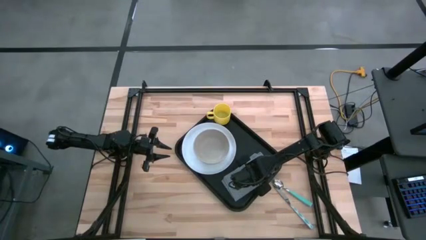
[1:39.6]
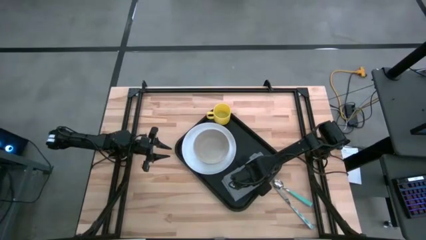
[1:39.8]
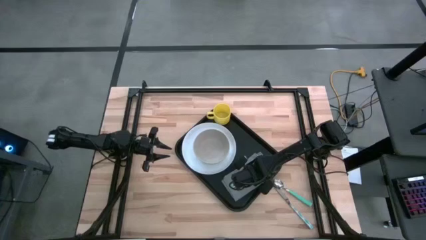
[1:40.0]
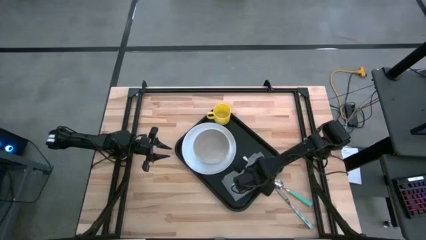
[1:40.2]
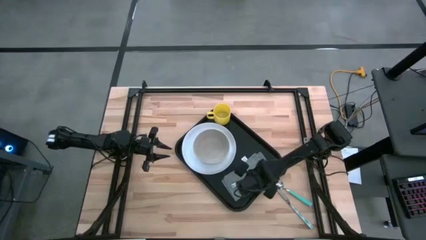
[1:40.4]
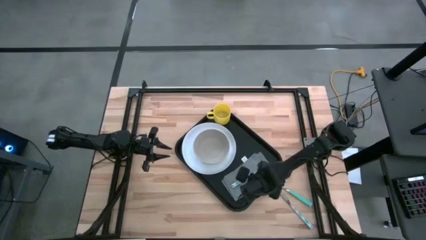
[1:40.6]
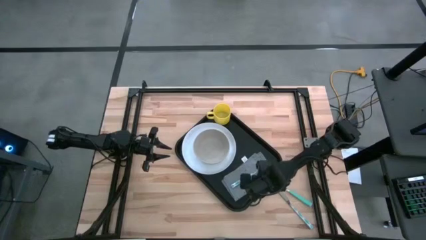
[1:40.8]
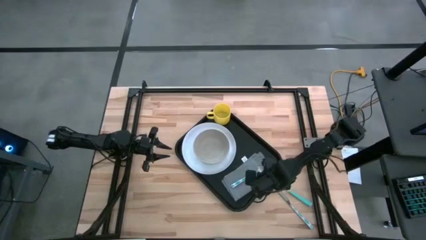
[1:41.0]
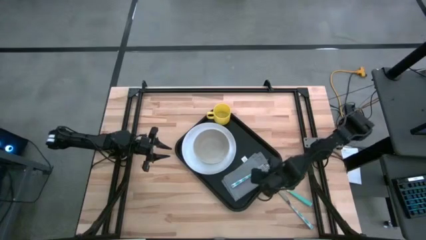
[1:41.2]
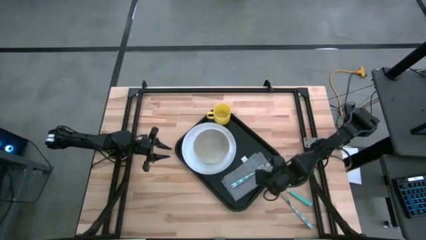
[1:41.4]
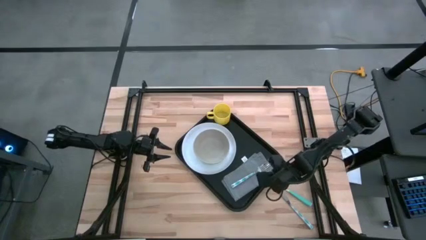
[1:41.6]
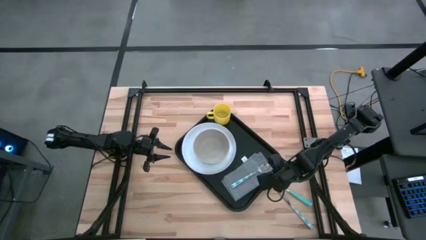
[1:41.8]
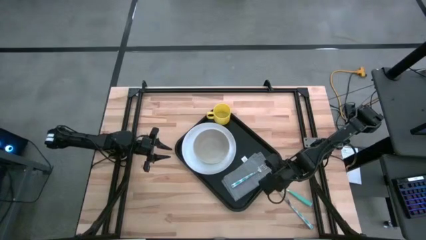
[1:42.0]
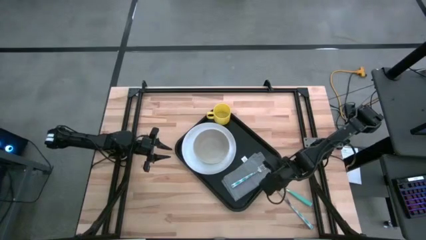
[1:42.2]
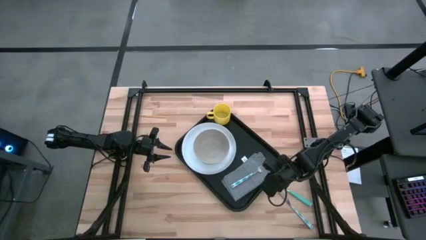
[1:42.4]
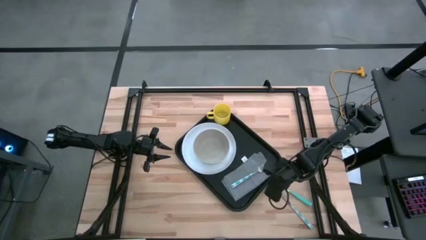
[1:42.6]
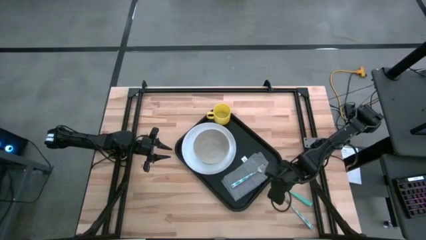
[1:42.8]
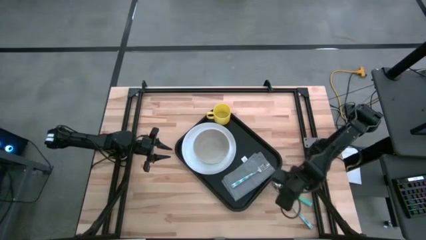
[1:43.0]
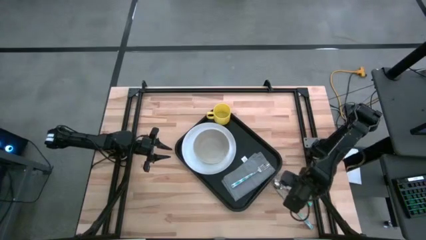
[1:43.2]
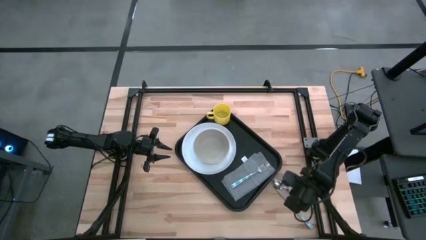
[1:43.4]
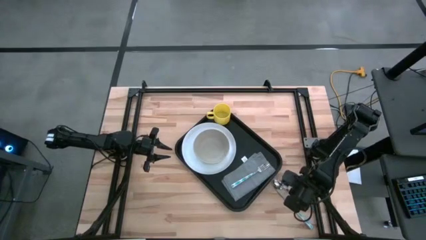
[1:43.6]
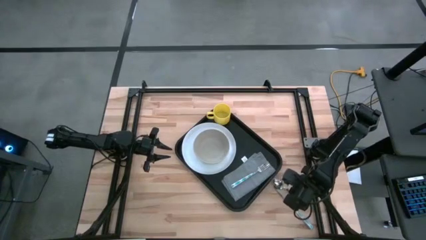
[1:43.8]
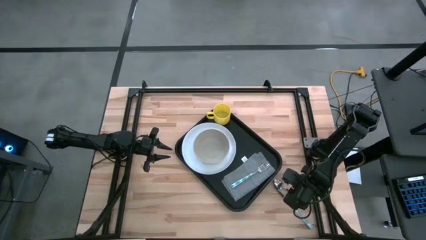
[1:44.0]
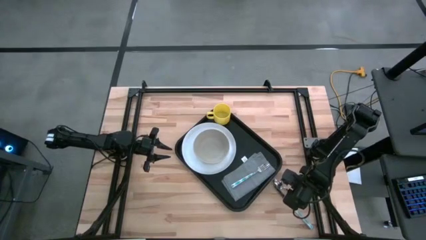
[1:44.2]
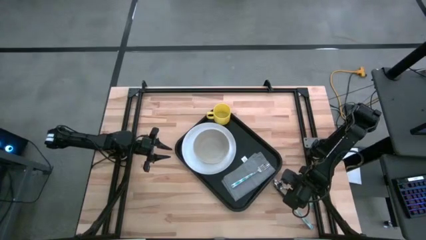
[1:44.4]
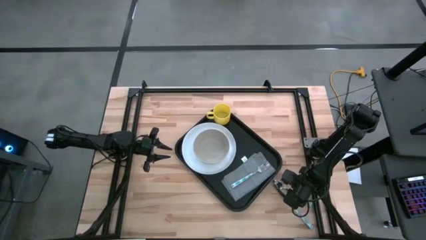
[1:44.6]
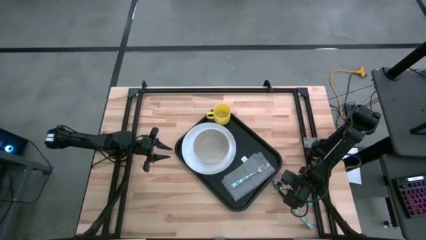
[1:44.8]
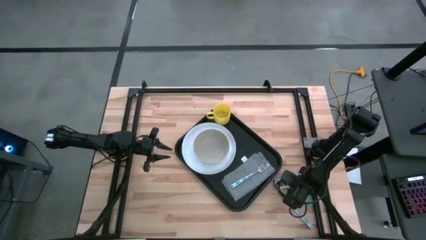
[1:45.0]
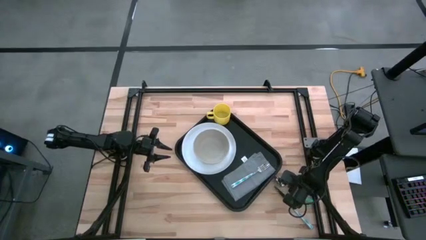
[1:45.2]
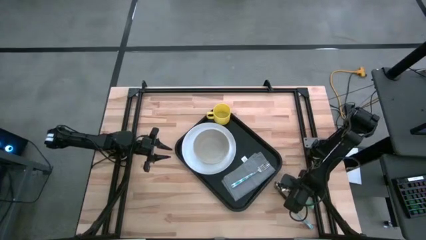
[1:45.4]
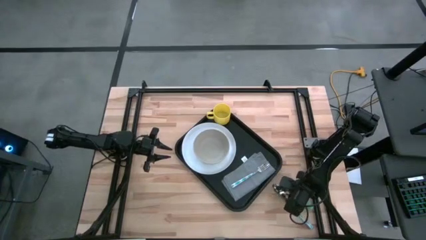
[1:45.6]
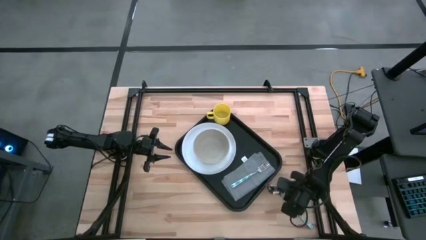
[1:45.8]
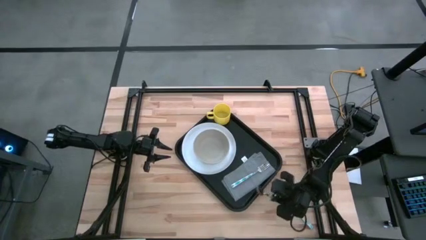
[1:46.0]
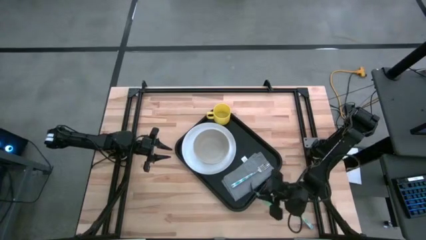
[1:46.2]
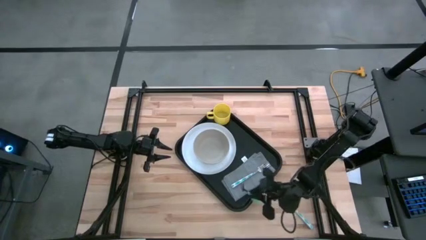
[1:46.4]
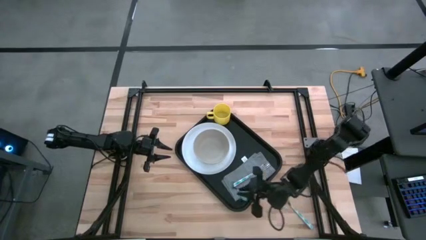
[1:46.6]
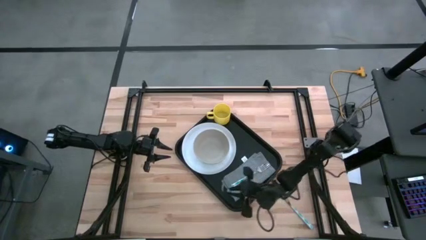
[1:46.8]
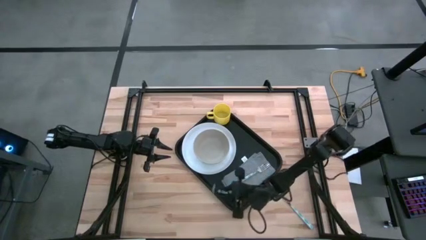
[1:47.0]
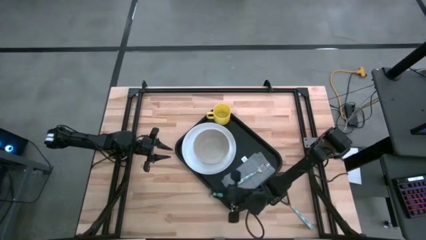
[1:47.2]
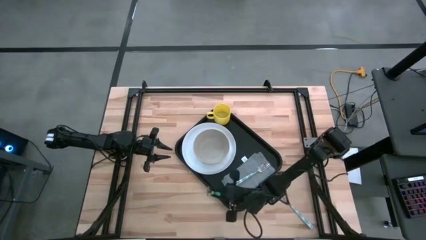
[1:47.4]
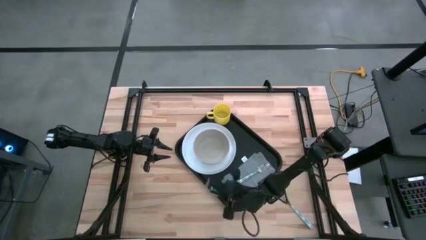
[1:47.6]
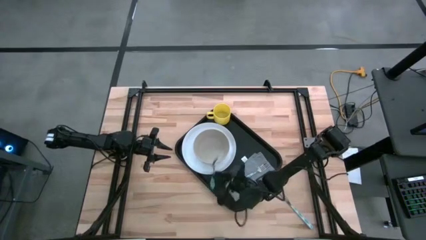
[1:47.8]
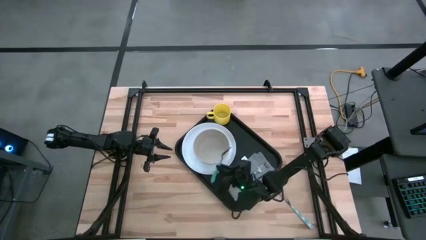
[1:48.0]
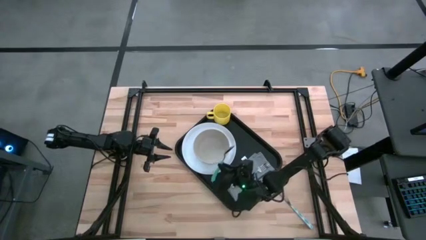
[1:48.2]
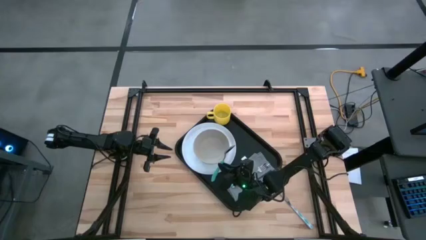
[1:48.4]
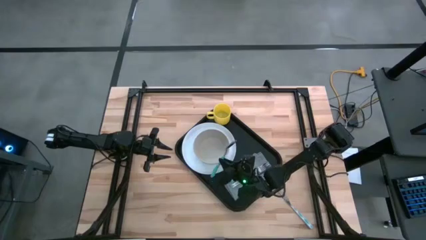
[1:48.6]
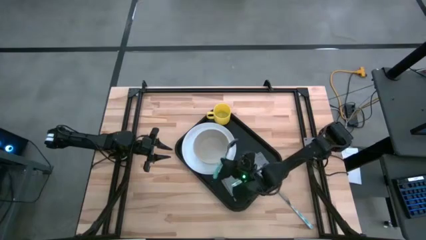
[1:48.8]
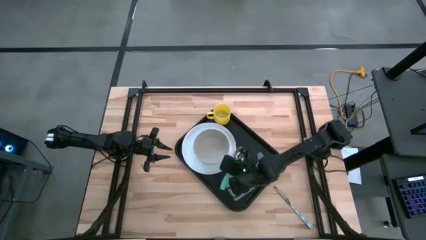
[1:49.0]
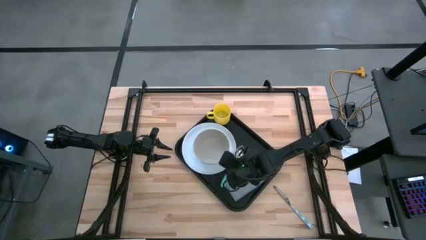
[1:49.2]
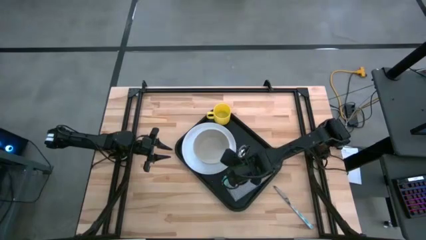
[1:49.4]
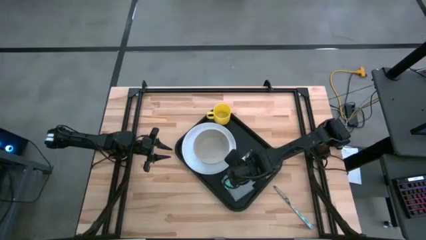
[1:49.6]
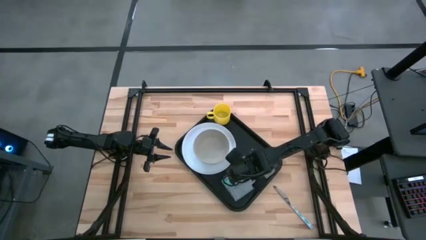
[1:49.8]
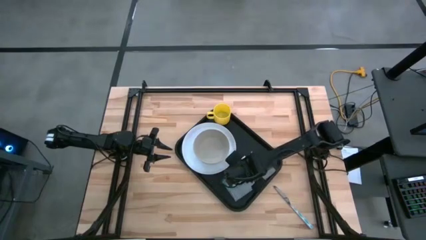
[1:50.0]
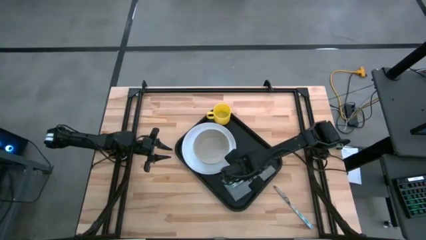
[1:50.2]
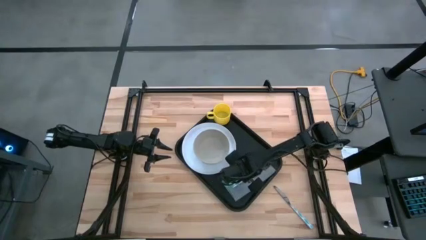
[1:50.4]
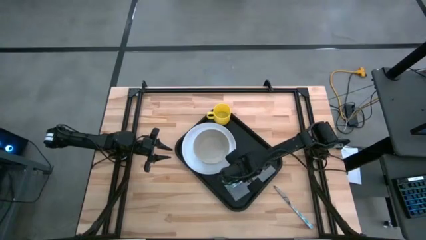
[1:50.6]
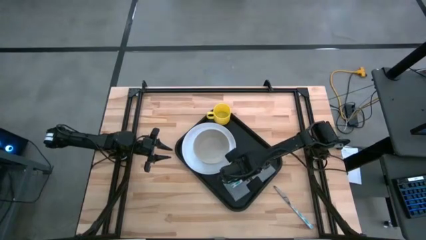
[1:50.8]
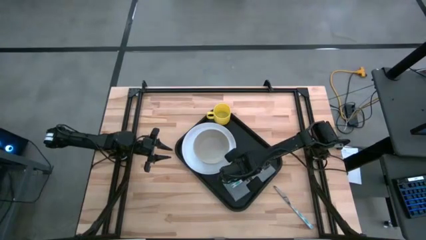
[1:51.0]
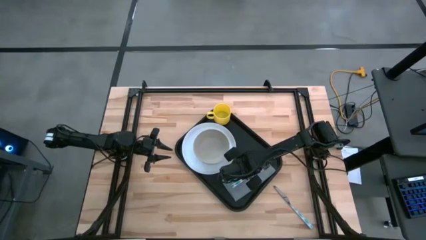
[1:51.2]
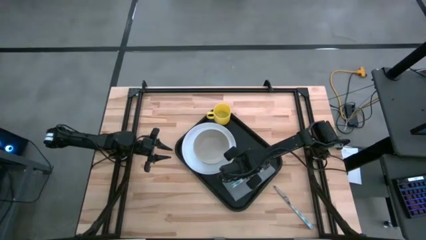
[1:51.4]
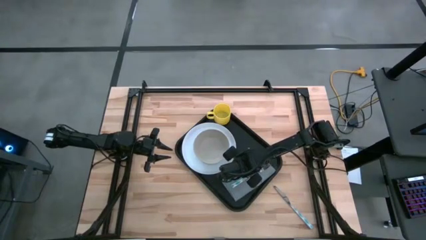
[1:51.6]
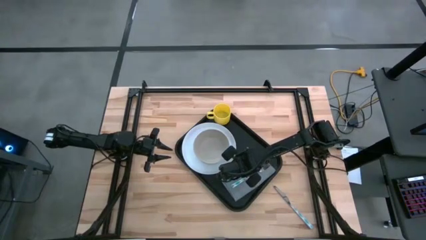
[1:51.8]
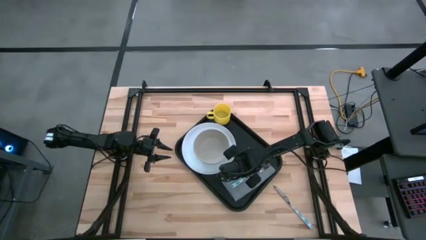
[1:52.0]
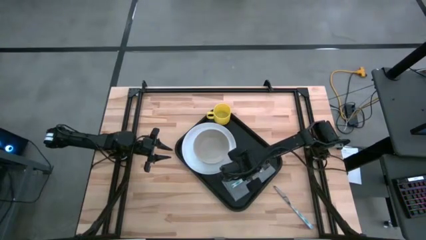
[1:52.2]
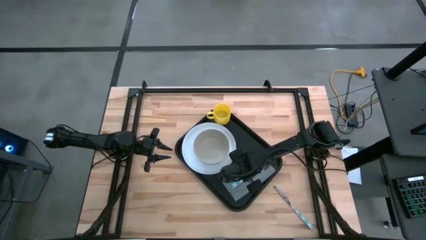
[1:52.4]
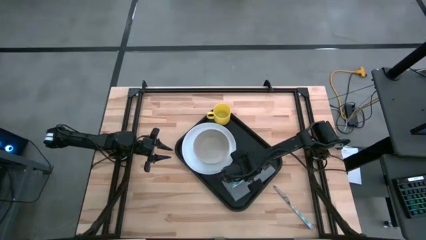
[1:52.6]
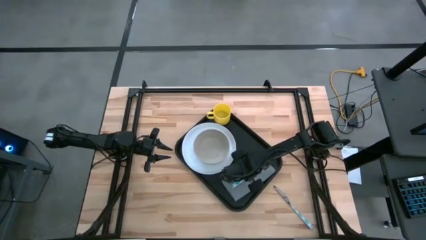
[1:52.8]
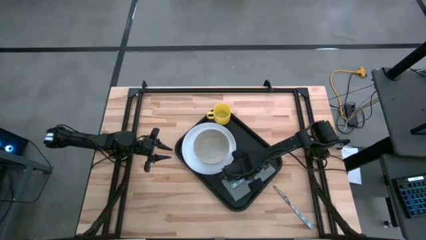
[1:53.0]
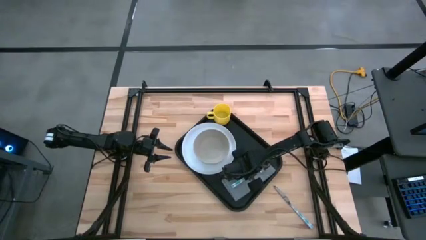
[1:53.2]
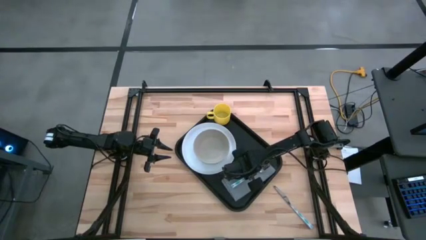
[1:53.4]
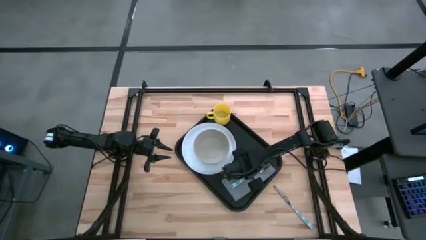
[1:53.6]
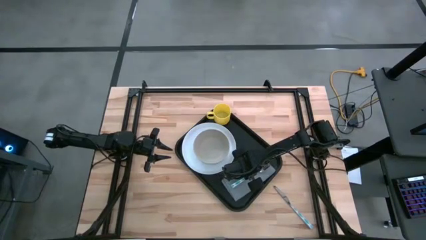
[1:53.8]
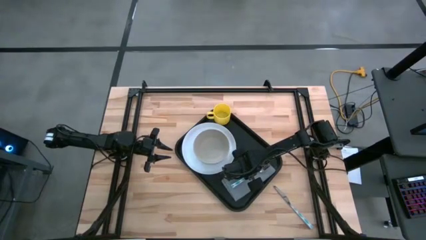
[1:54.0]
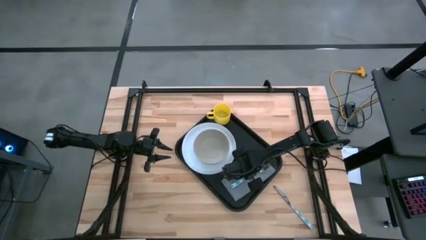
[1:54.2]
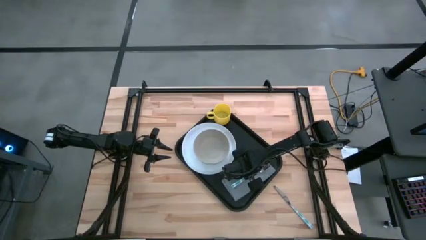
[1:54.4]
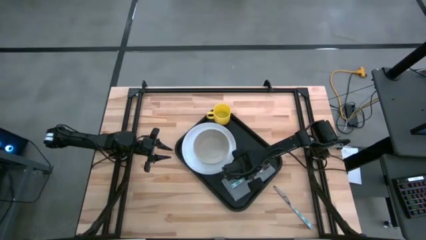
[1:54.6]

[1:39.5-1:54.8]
Task: Set up tray
Put the blue spoon to the left of the white and blue fork on the gray napkin on the black tray

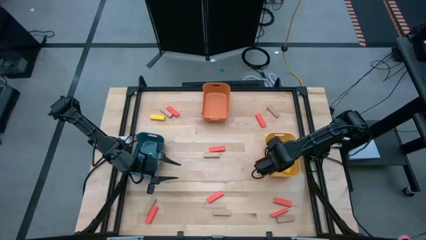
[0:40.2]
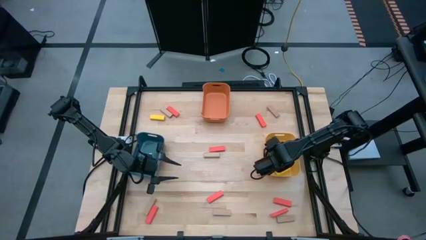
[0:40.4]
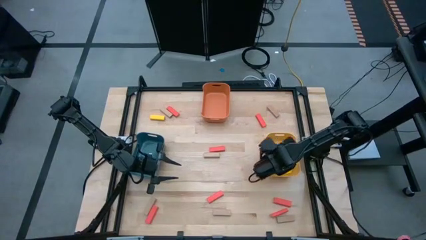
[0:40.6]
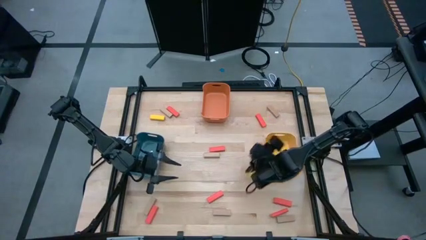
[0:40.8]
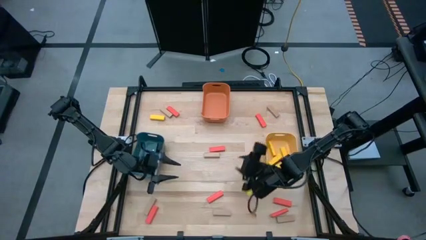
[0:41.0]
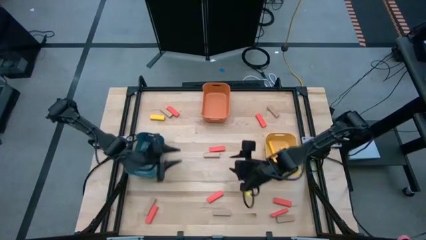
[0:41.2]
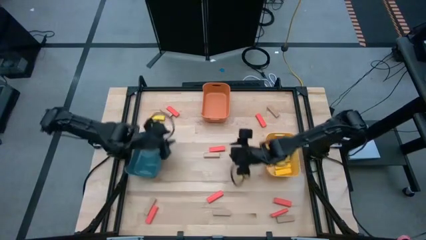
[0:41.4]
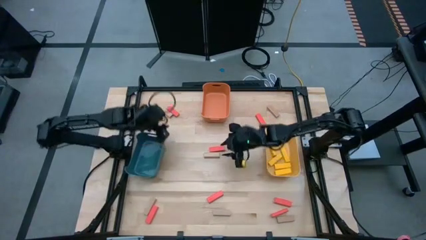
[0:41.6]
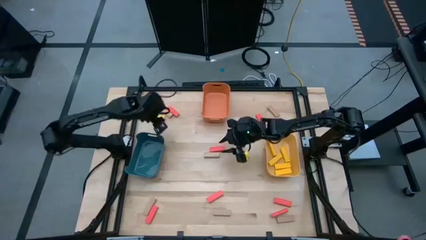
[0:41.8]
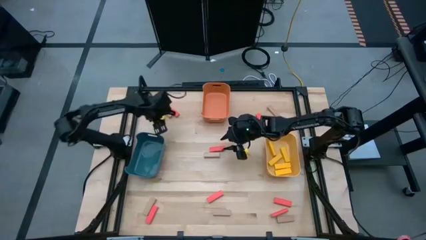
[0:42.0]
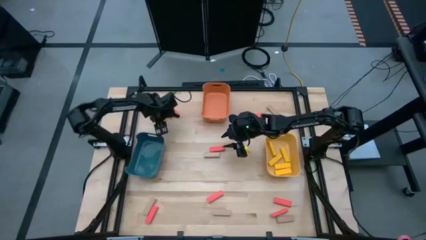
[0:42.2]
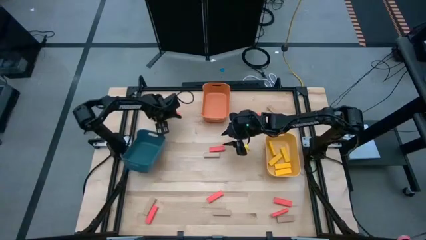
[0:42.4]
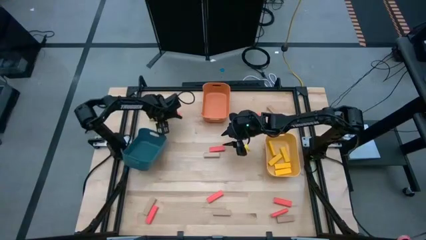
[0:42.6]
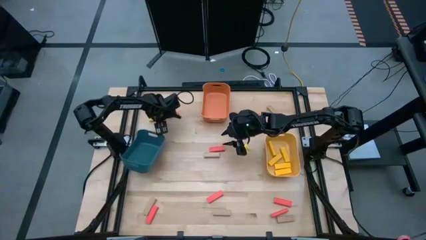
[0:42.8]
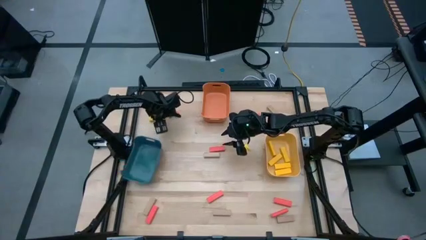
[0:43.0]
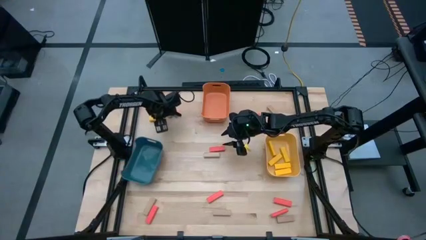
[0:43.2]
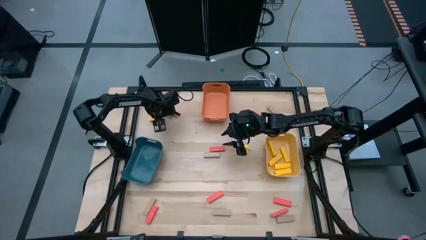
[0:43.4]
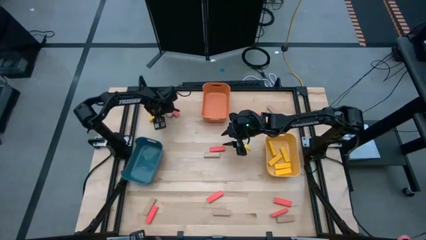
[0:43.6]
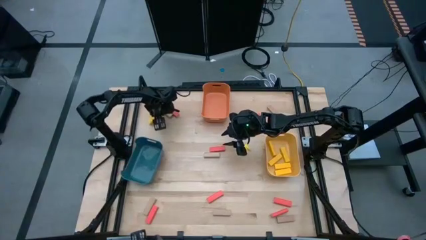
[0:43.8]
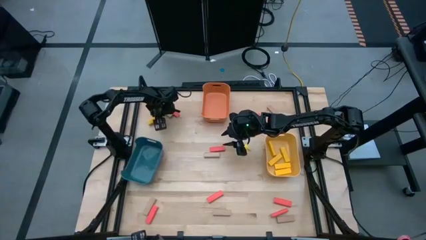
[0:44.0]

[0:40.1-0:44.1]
Task: Sort blocks
Put the yellow block into the yellow bin
